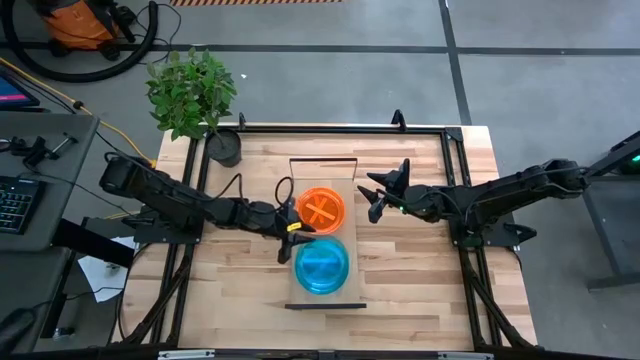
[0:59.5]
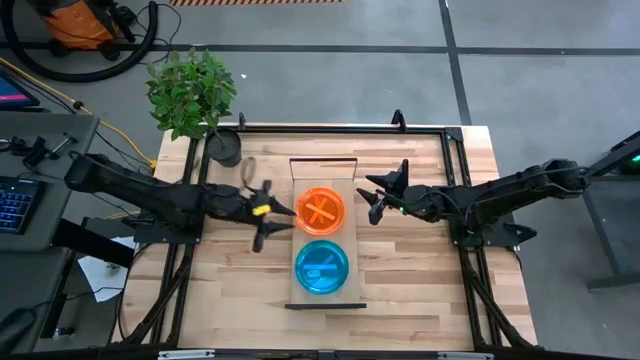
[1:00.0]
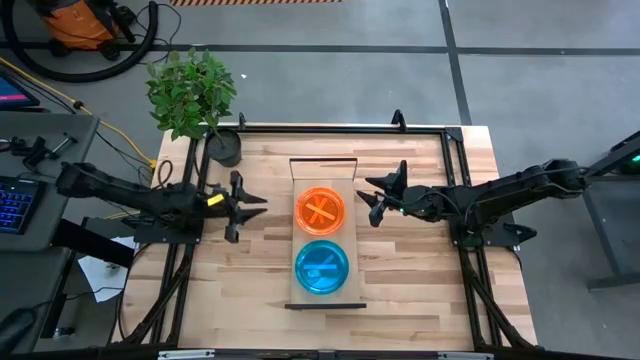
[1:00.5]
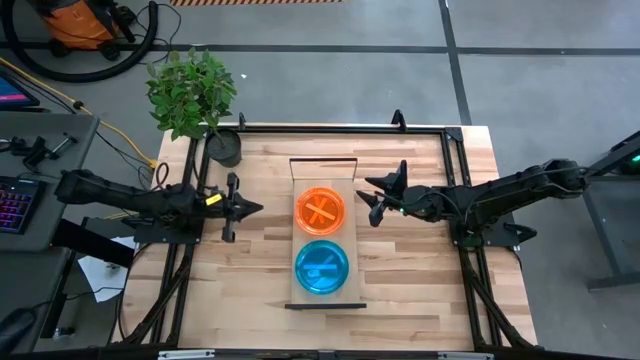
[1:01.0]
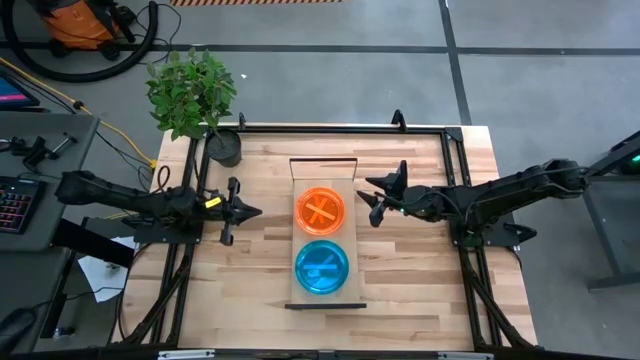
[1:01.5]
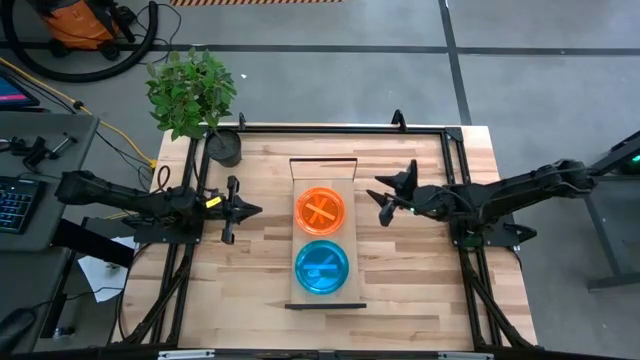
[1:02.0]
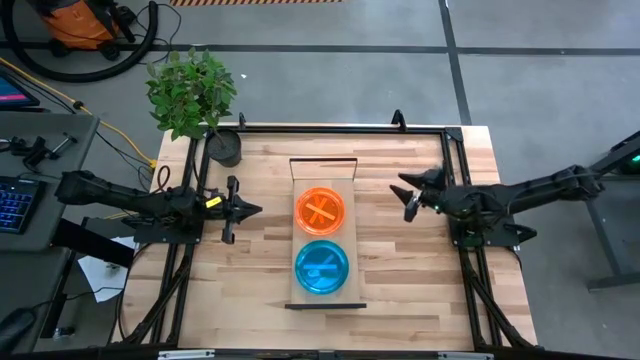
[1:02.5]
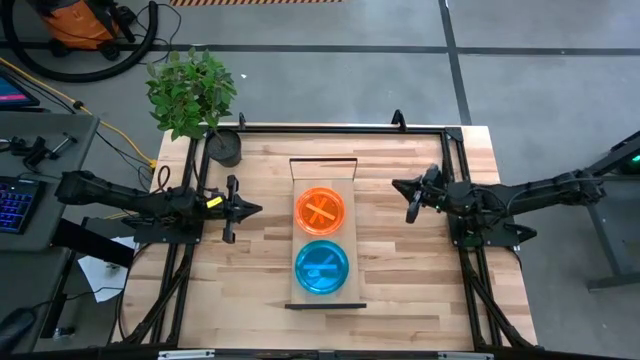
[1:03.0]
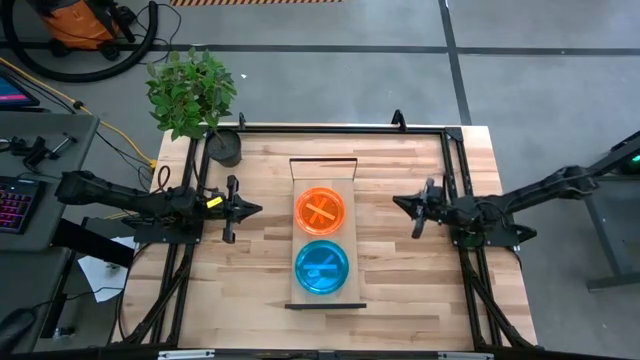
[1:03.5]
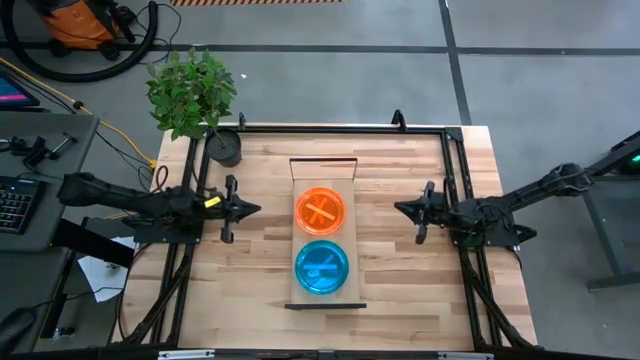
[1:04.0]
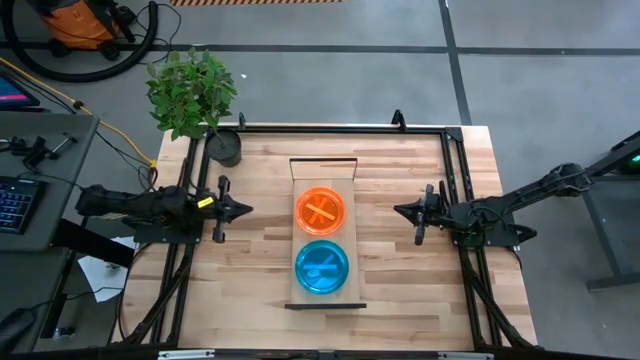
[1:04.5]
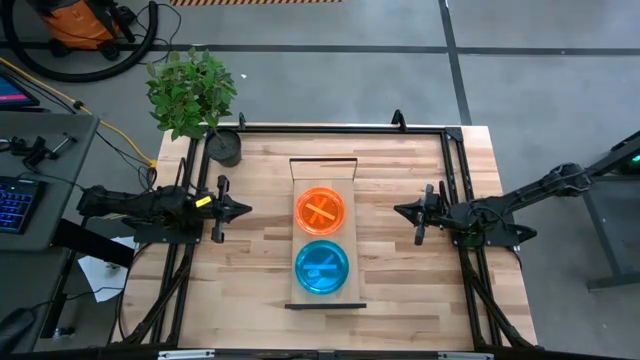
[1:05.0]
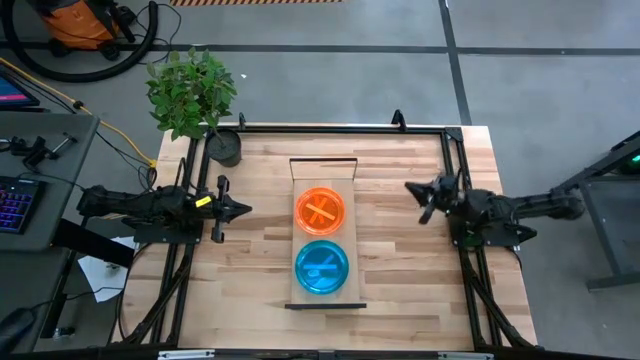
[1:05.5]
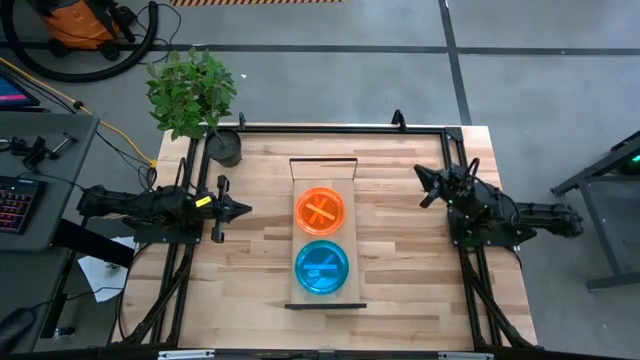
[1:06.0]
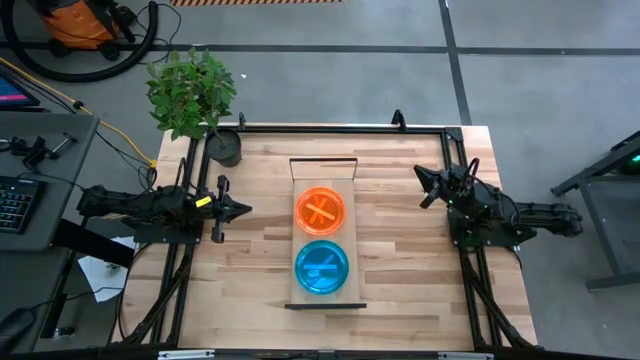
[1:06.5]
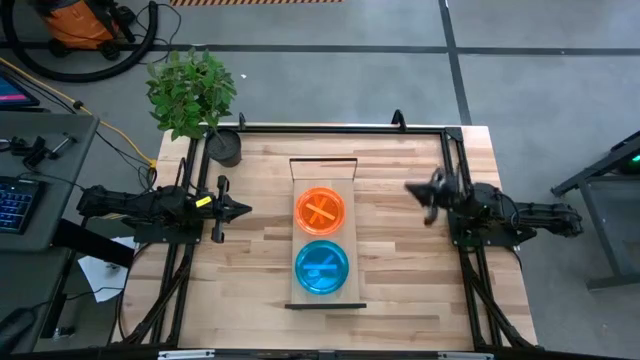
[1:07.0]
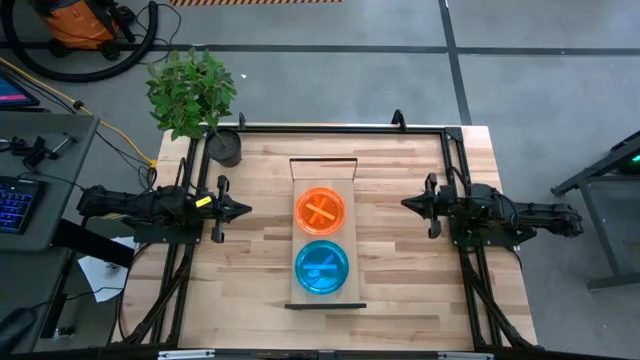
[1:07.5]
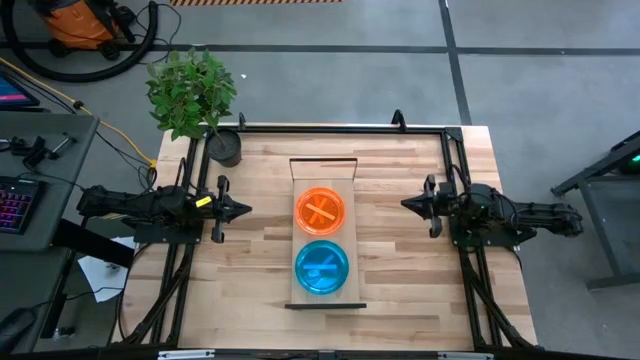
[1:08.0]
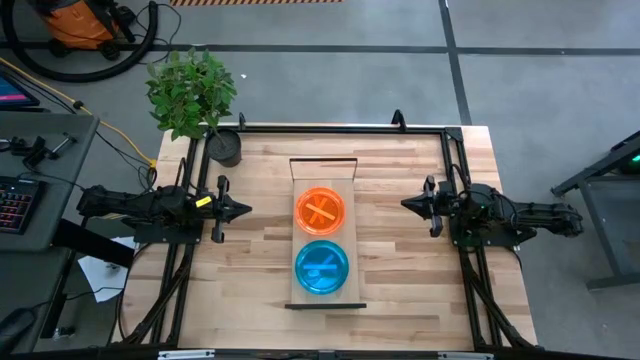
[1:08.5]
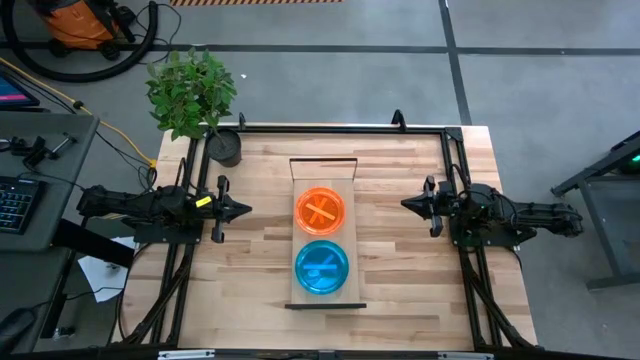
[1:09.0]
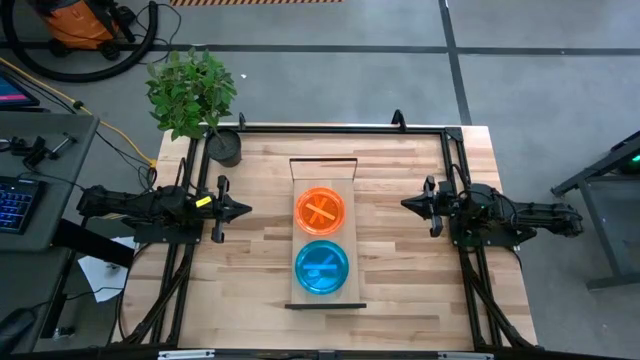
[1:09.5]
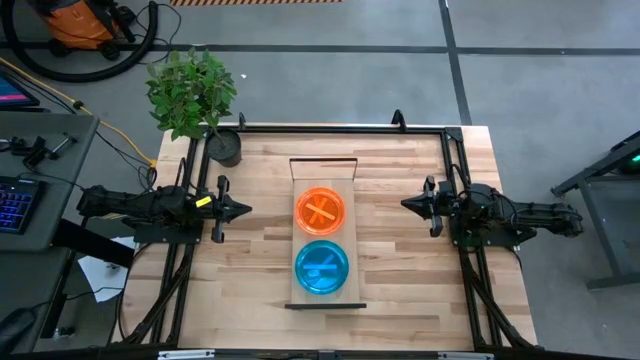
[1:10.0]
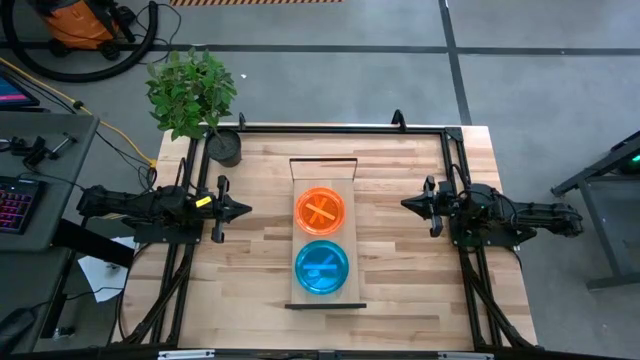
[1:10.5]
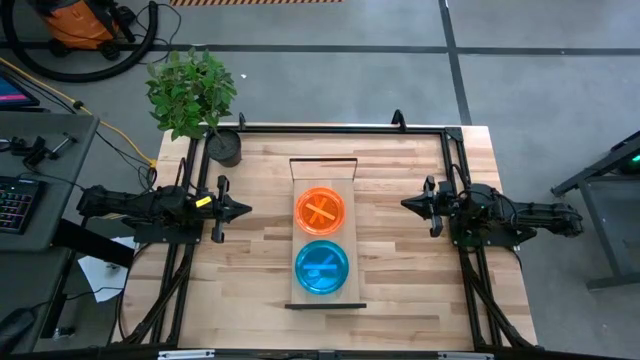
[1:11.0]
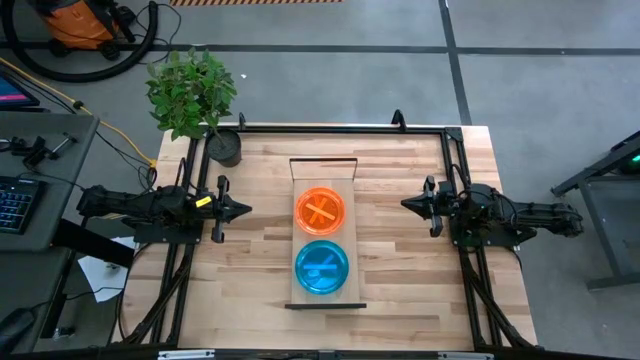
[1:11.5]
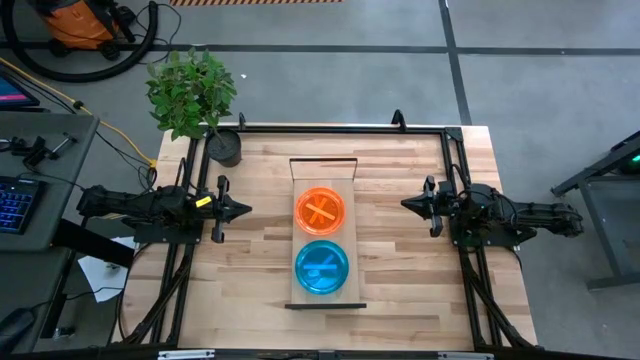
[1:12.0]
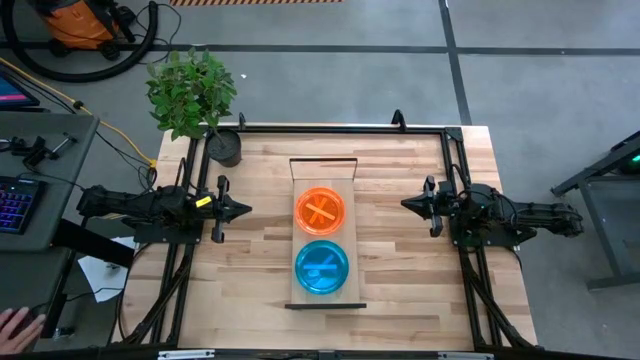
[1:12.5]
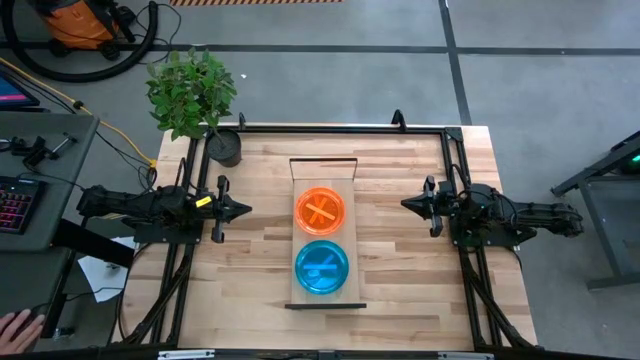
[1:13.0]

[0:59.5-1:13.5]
Task: Place and stack plates onto a shelf
Return to Home Position

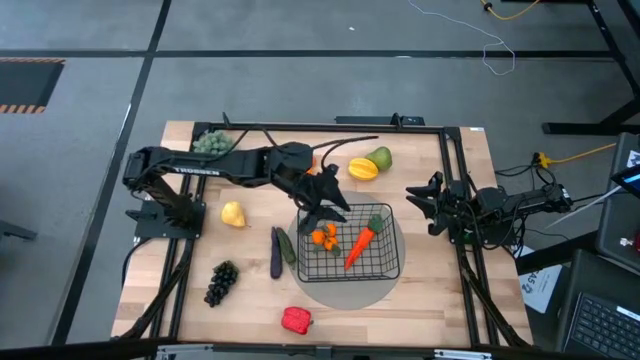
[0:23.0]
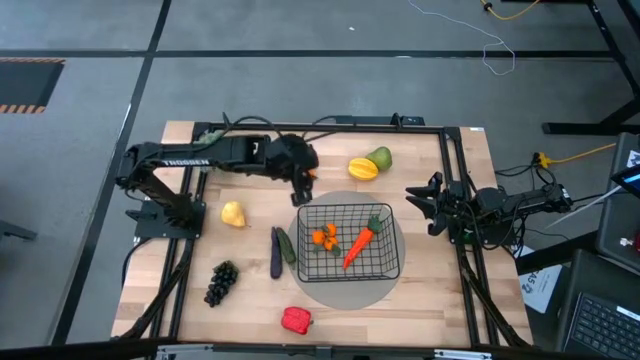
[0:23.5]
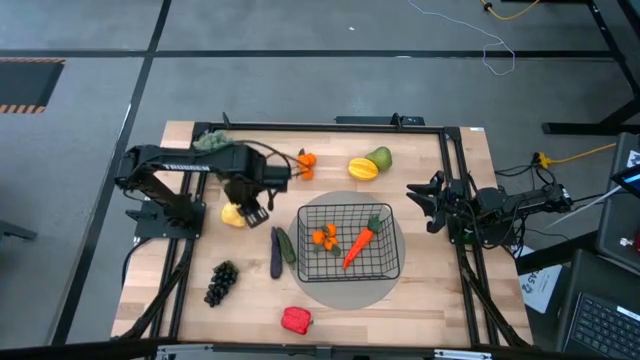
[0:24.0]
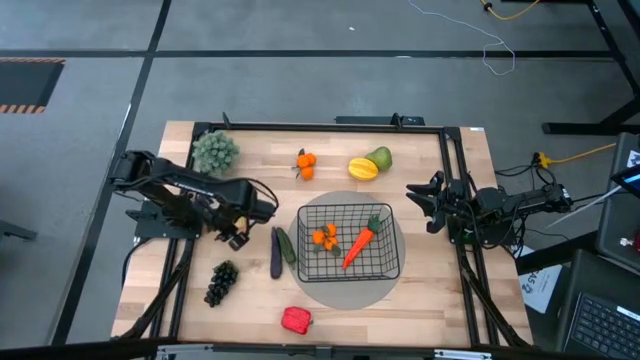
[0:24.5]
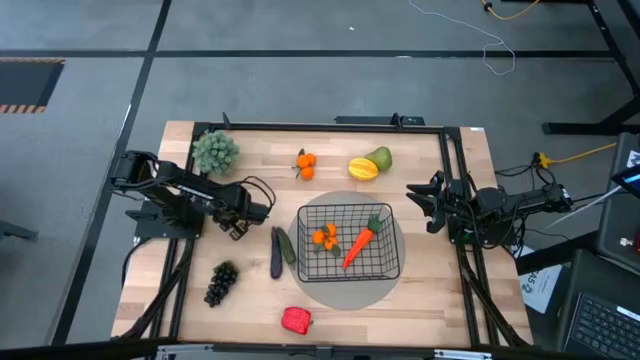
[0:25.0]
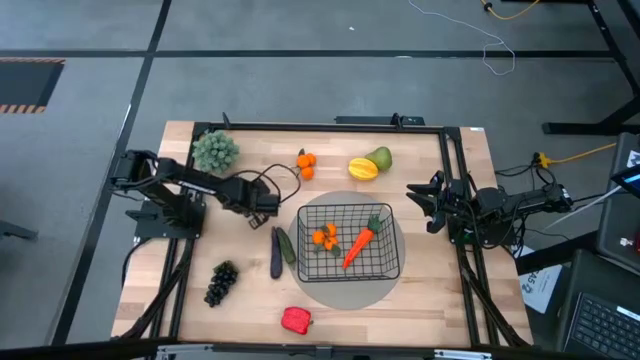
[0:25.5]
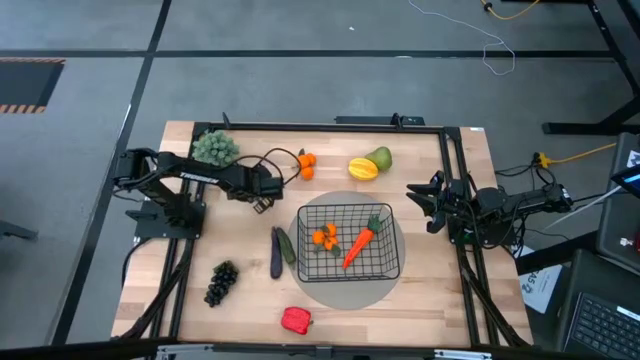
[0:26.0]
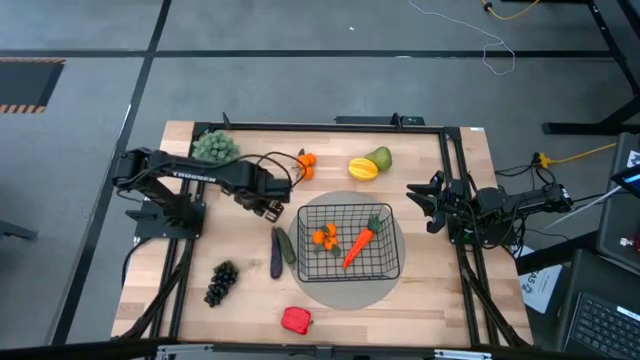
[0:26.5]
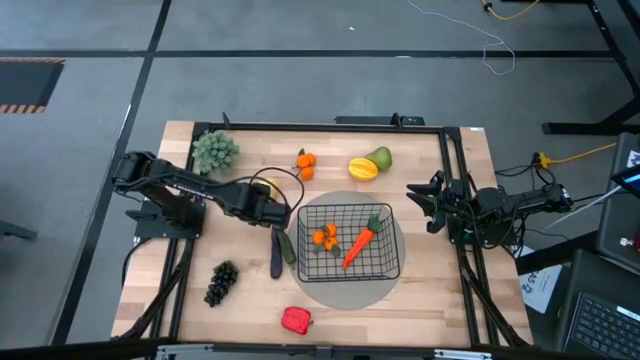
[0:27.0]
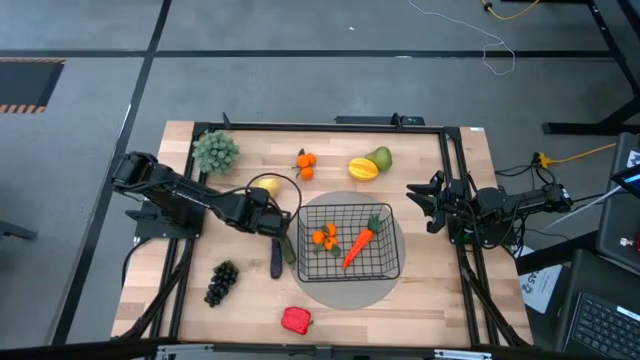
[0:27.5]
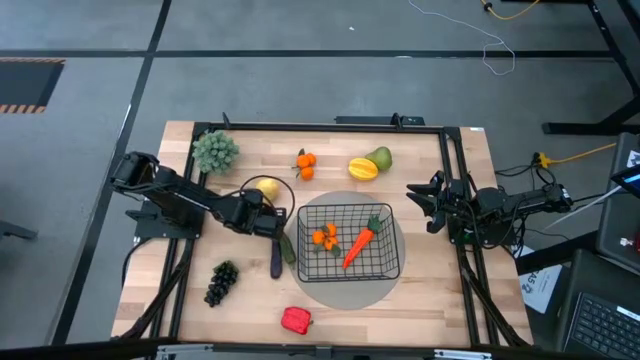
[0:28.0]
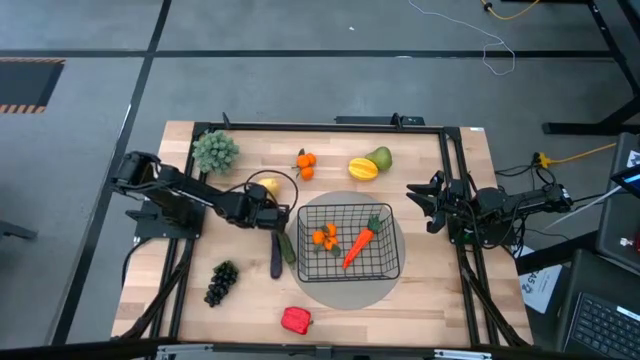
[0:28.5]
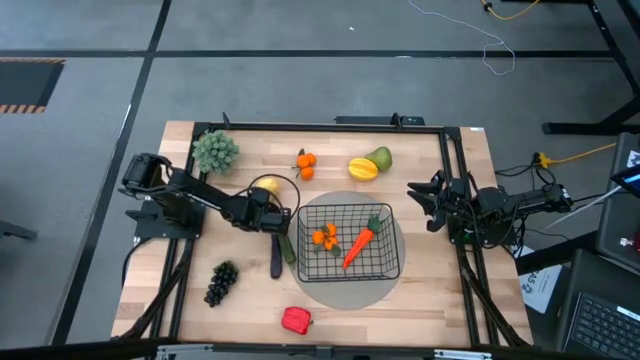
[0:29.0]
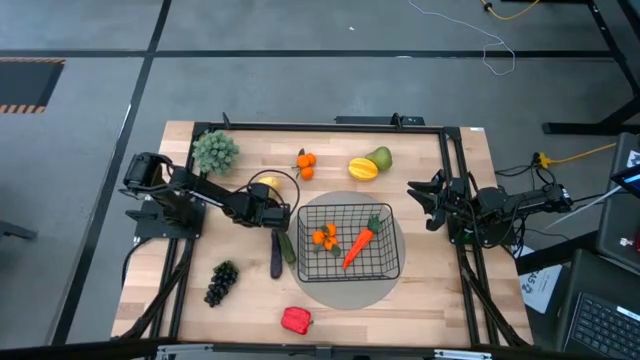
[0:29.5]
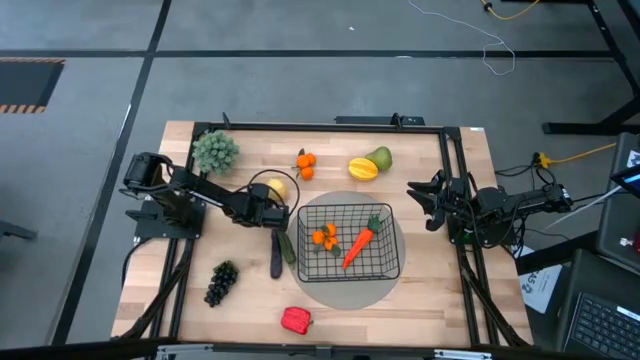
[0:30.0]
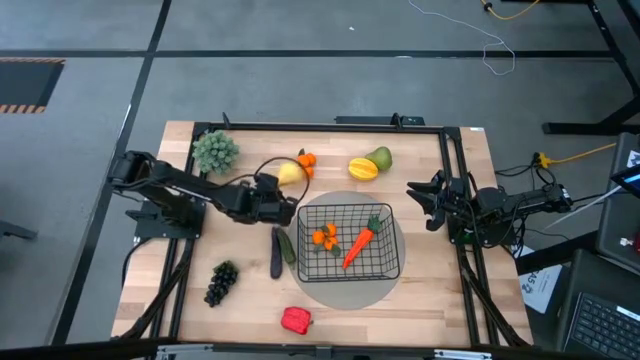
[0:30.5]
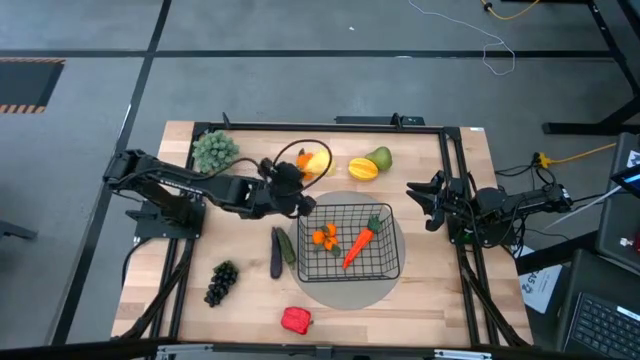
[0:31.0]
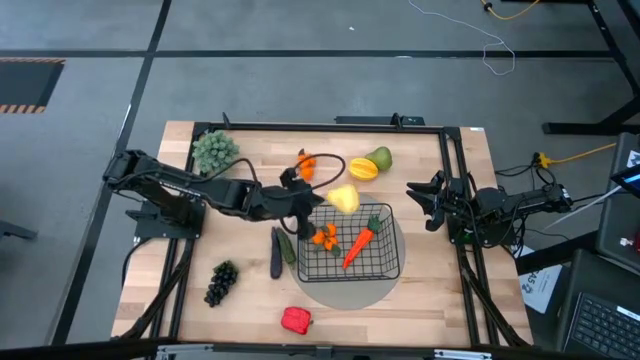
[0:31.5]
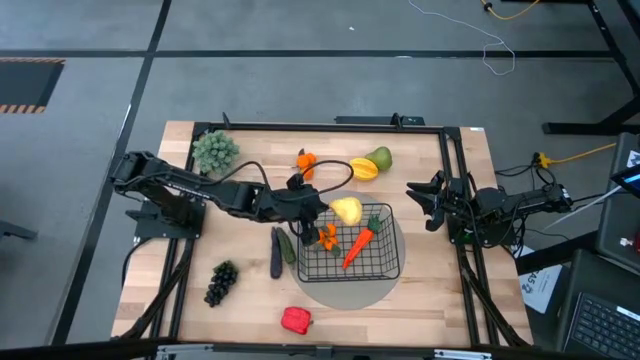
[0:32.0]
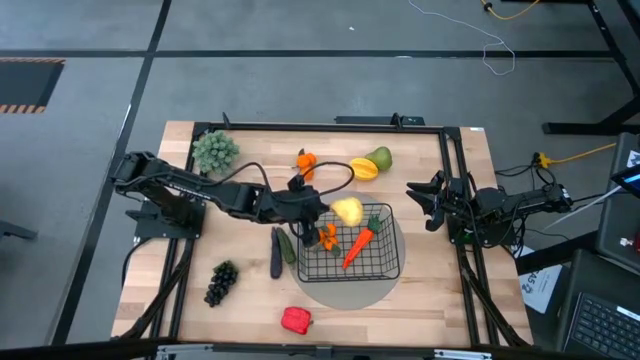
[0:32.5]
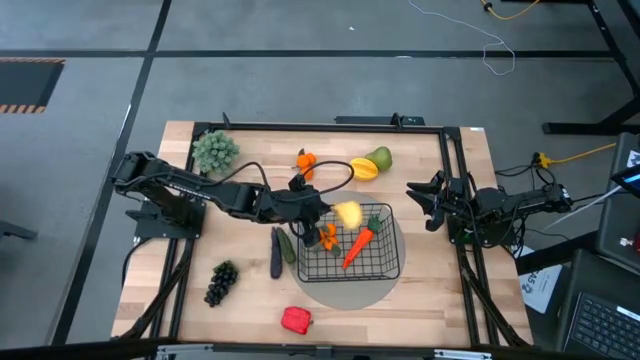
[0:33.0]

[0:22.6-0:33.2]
Task: Build produce basket
Put the yellow pear into the black wire basket
